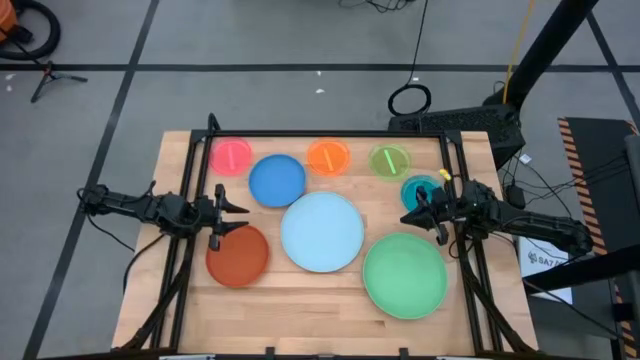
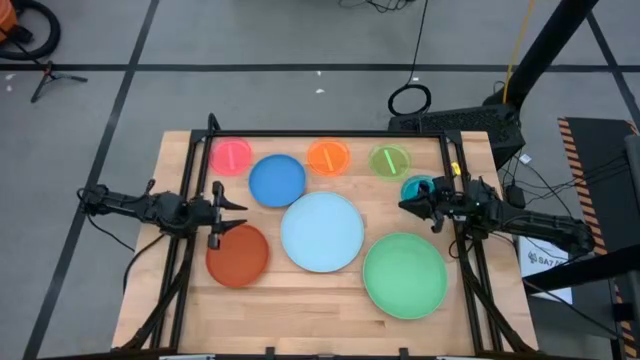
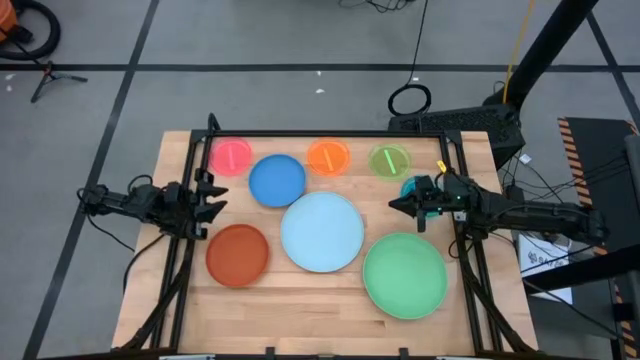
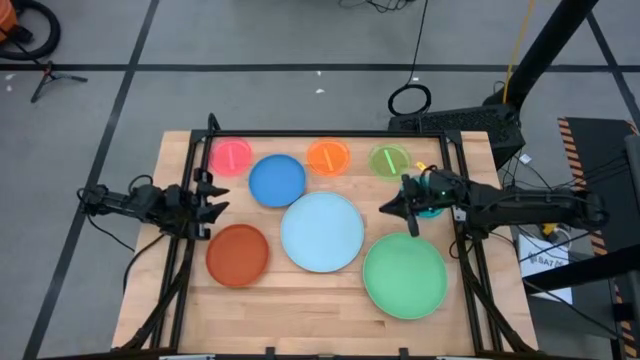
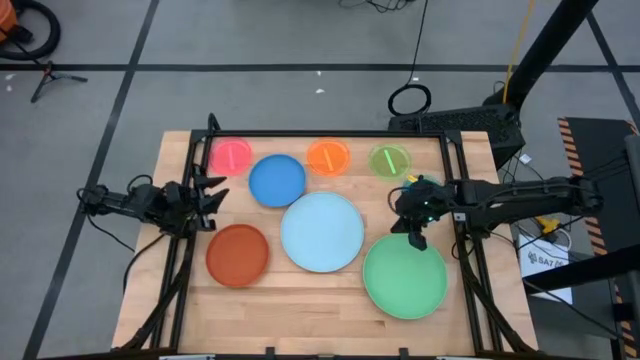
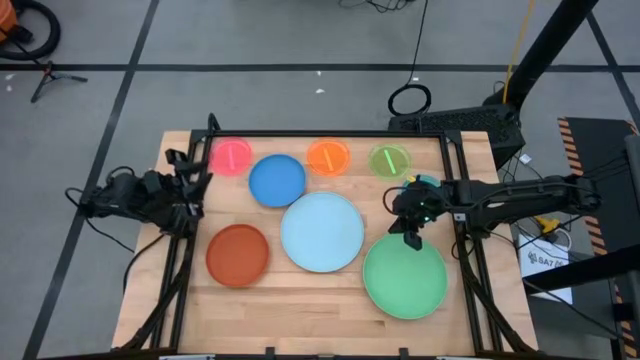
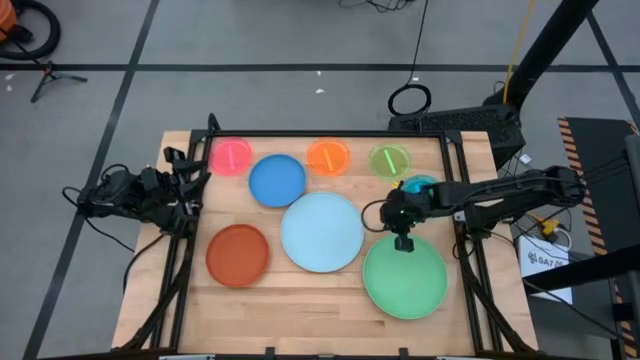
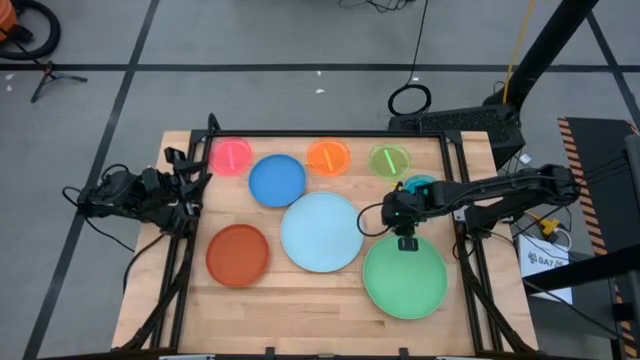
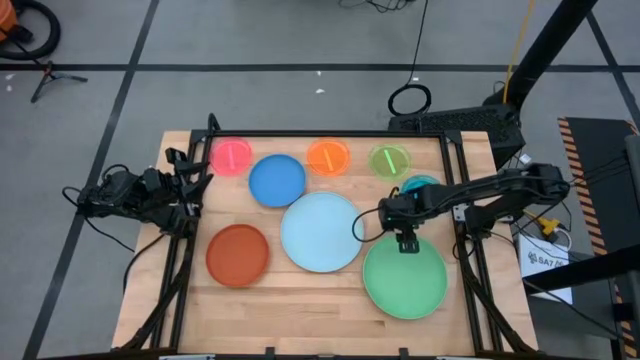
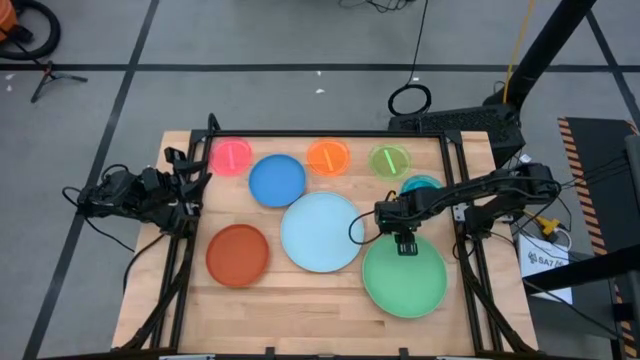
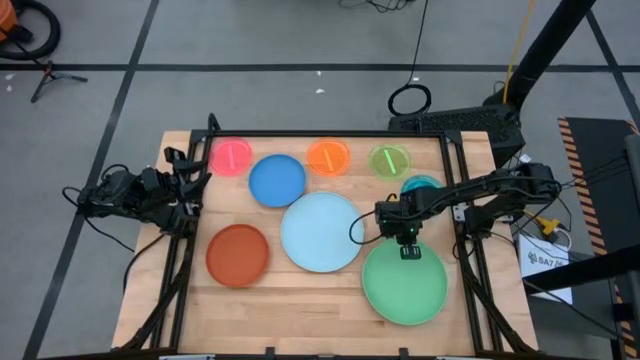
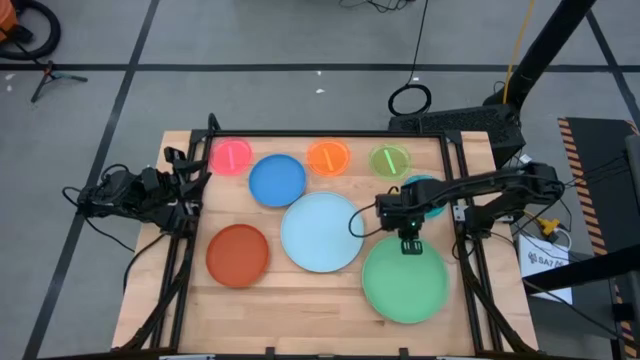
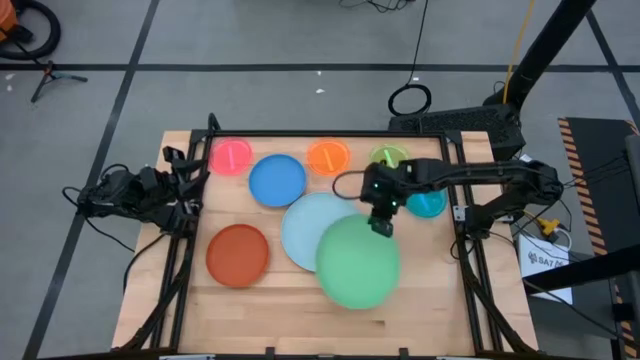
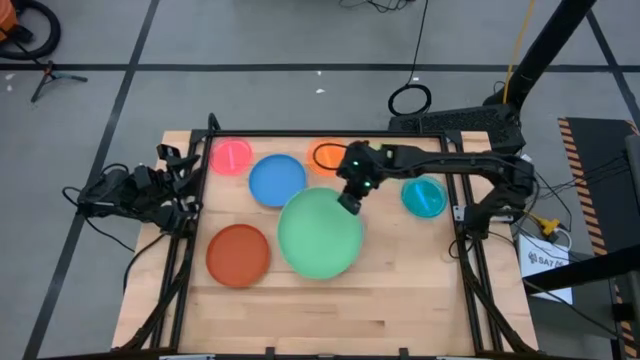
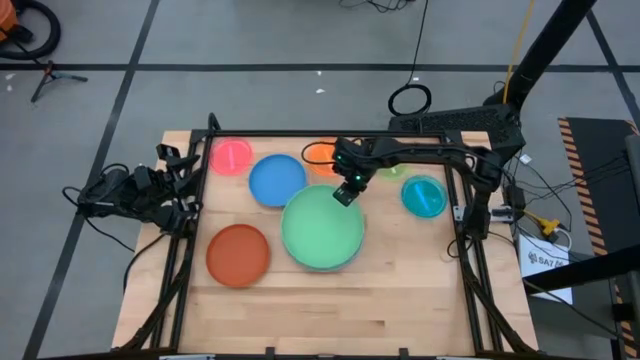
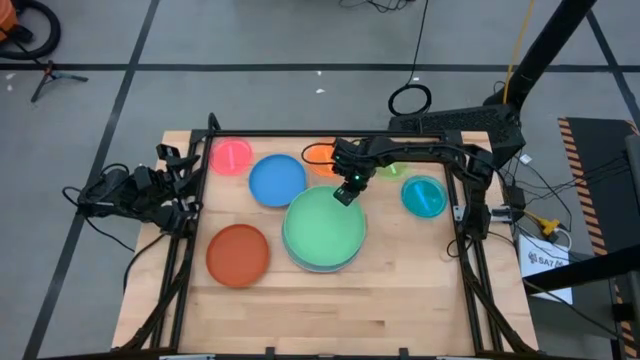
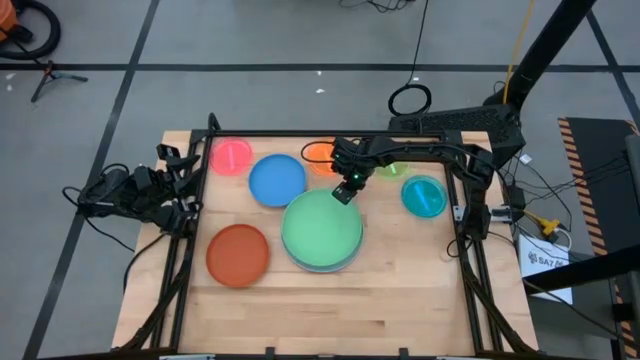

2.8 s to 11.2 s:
Task: Stack plastic plates
Stack the green plate on top of the light blue plate

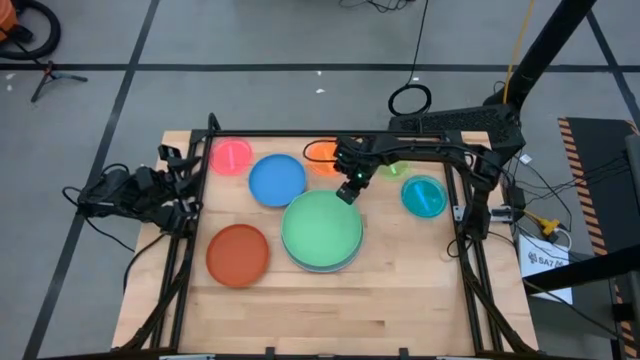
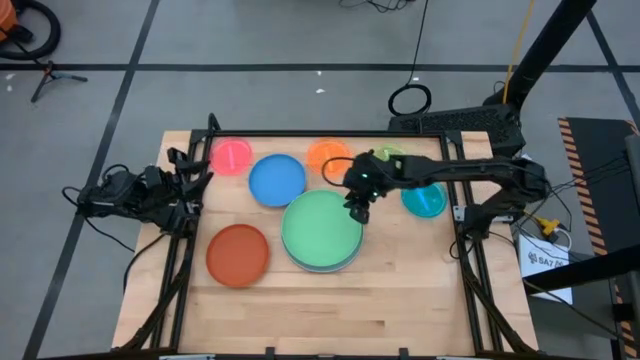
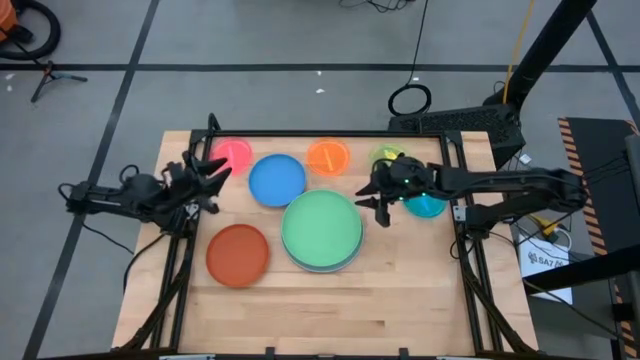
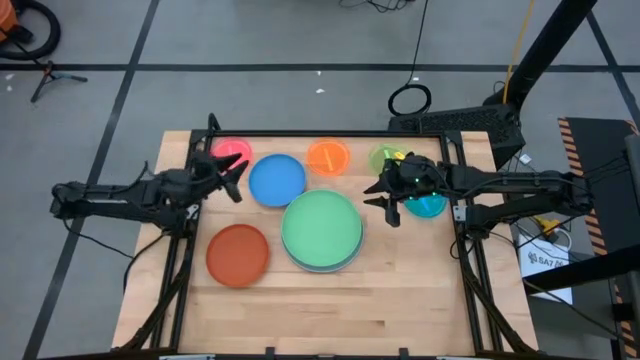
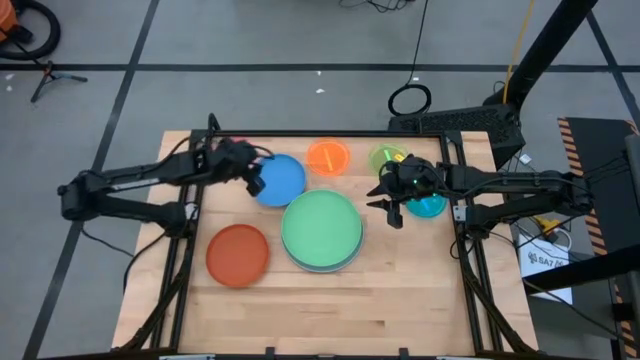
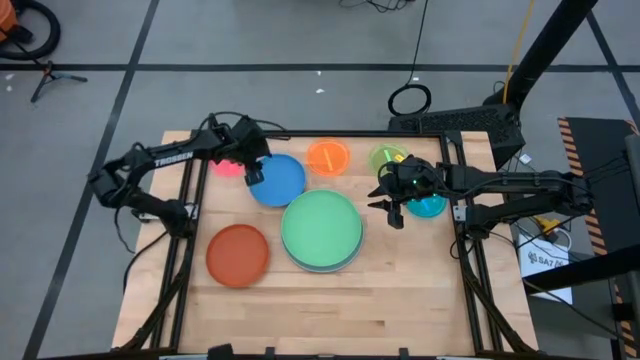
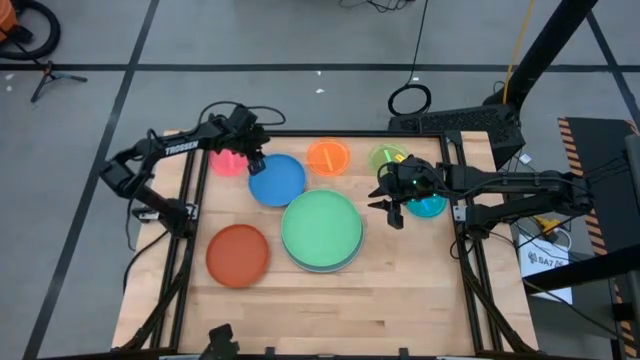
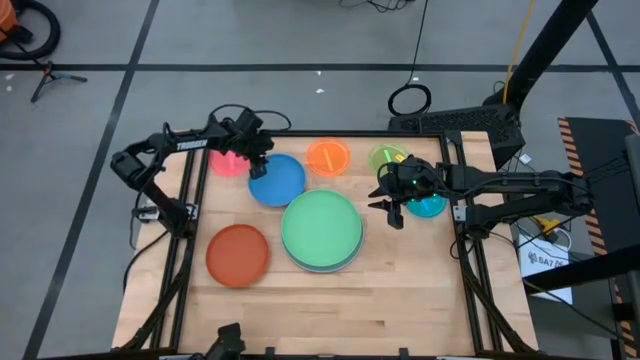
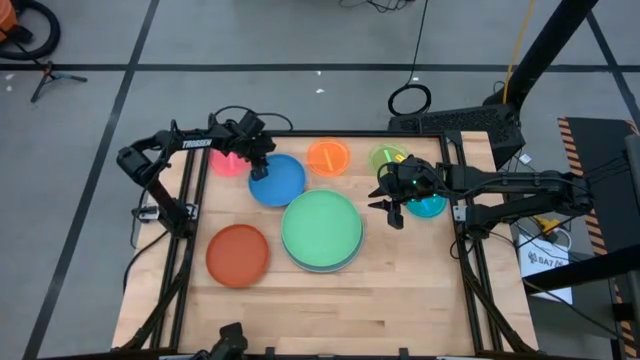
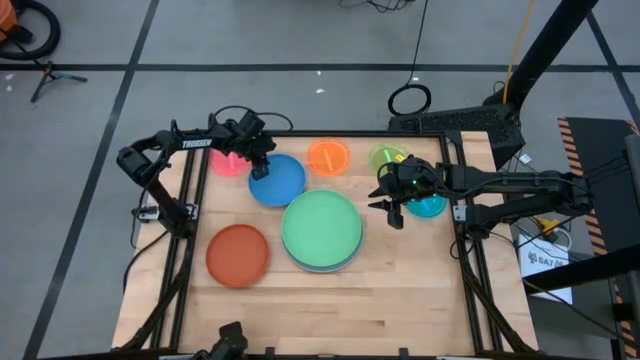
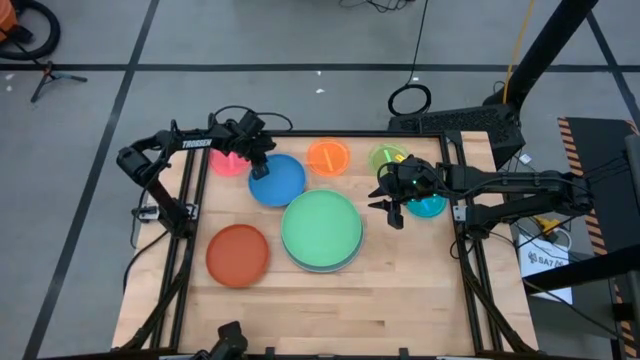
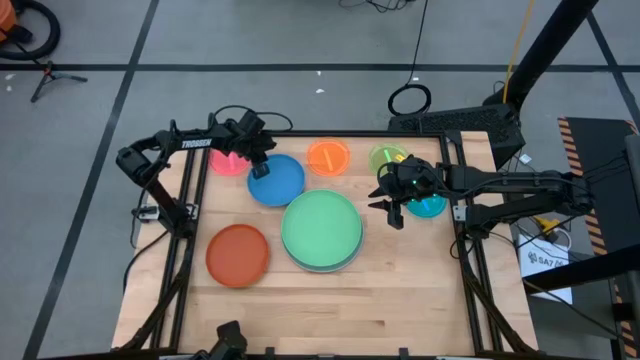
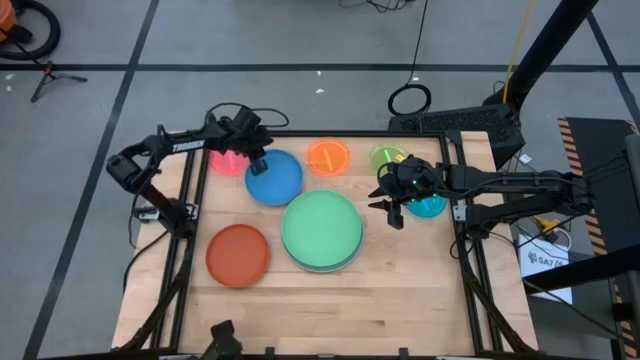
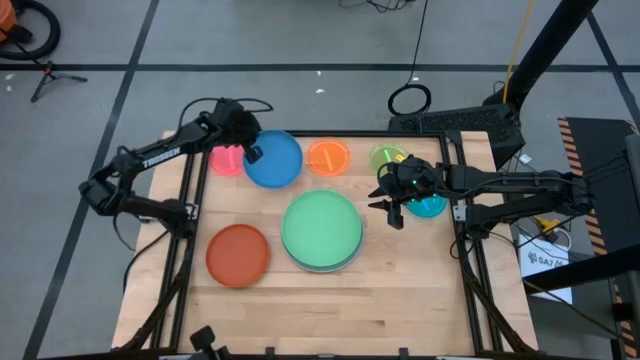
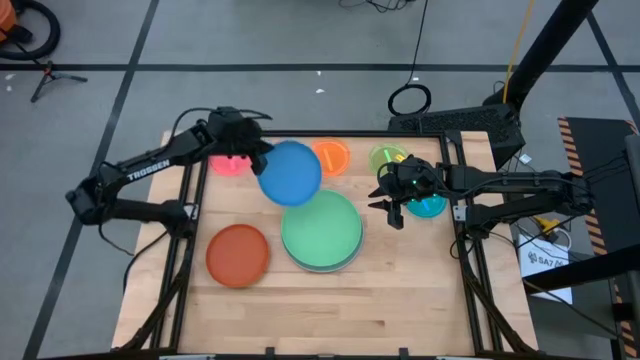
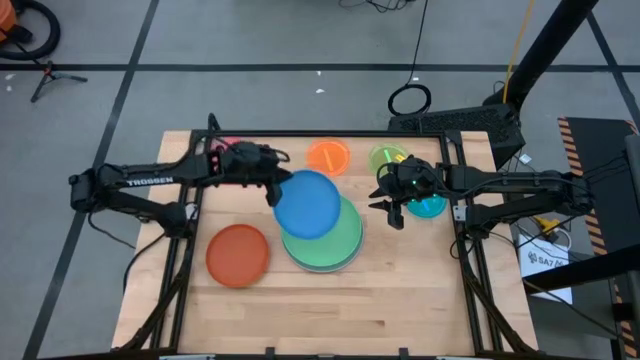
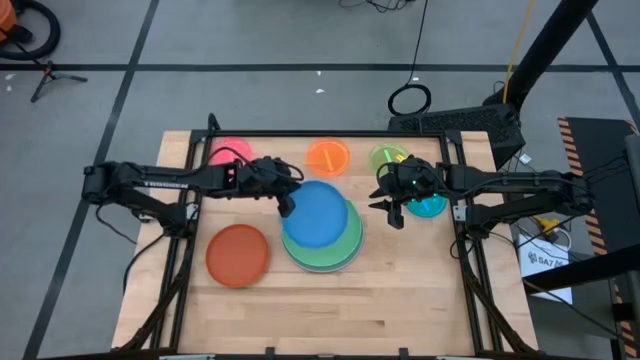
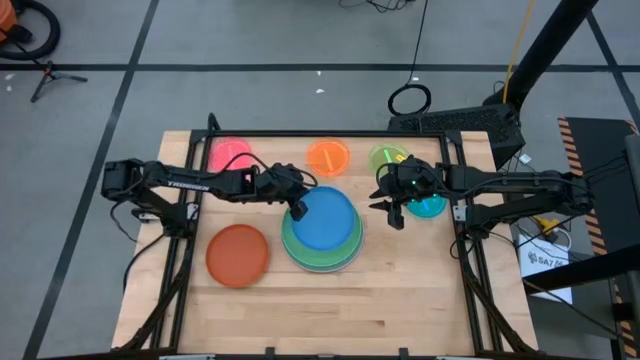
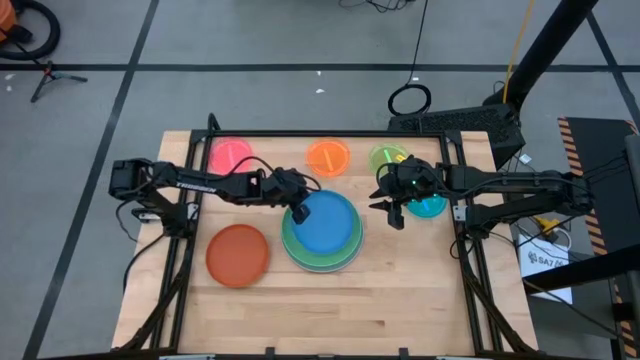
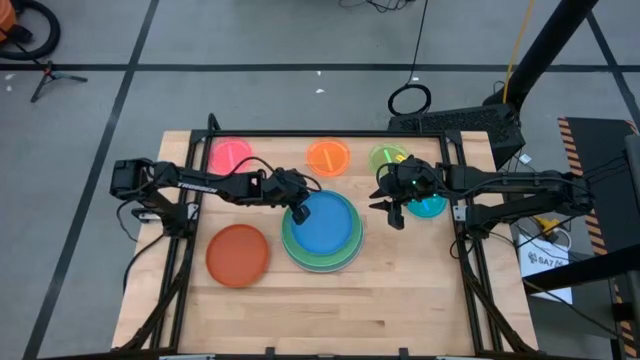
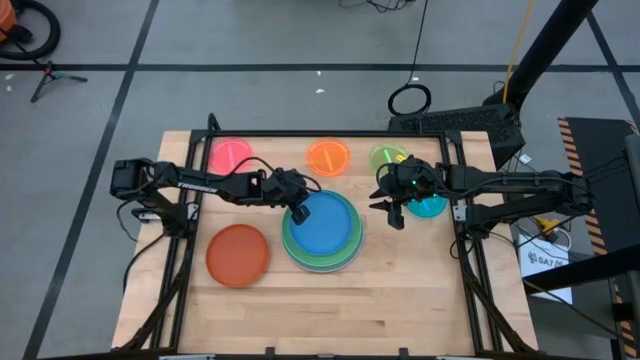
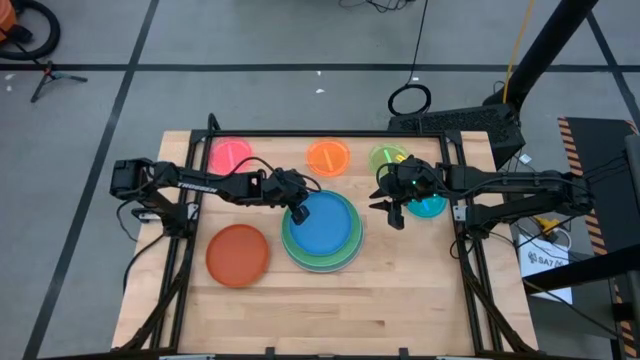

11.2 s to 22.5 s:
Stack the dark blue plate on top of the green plate
